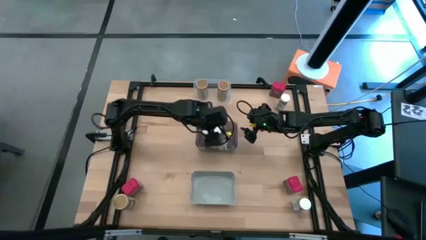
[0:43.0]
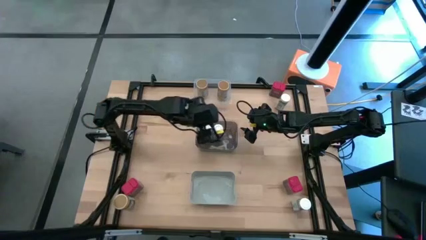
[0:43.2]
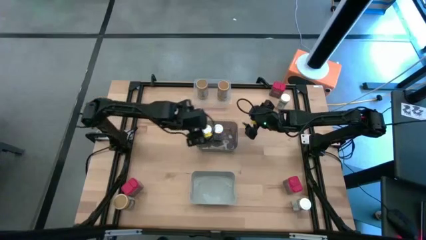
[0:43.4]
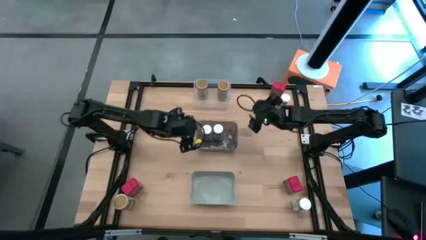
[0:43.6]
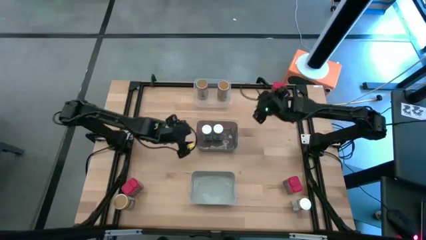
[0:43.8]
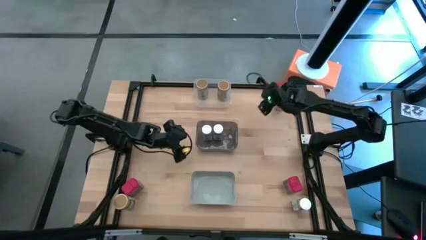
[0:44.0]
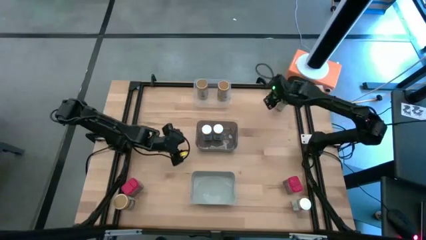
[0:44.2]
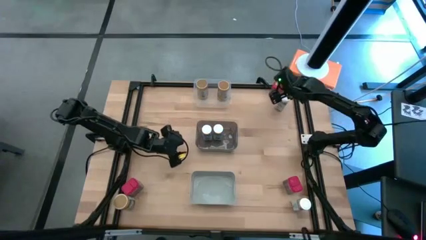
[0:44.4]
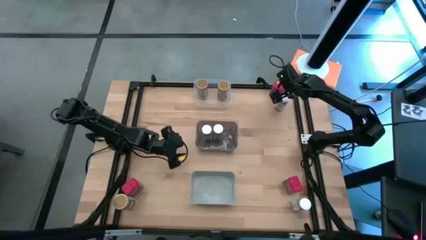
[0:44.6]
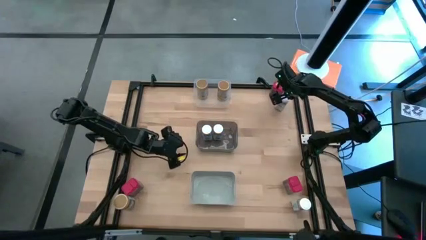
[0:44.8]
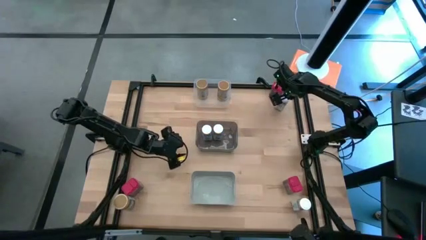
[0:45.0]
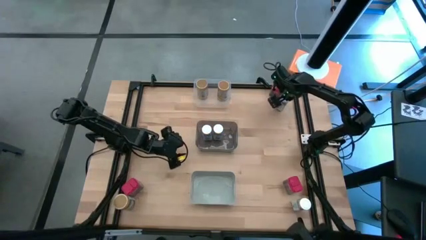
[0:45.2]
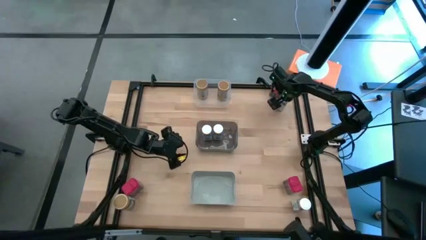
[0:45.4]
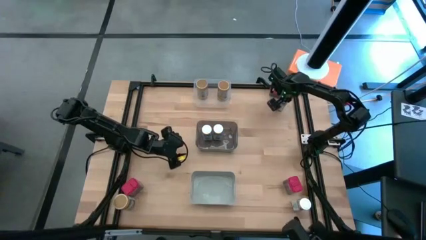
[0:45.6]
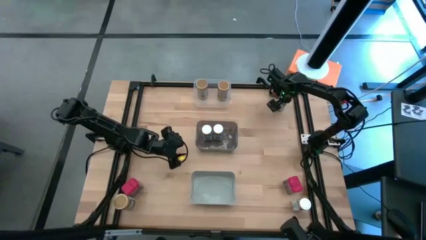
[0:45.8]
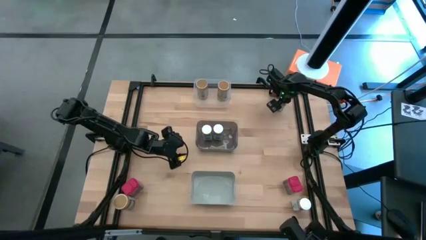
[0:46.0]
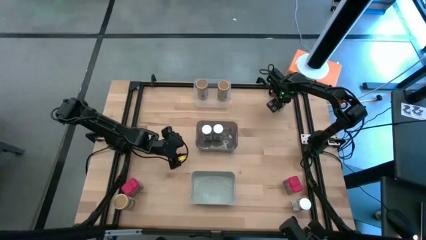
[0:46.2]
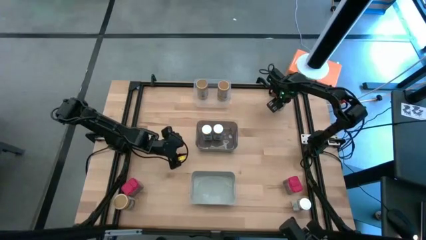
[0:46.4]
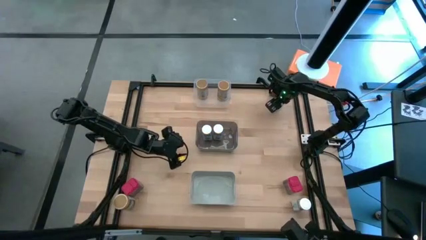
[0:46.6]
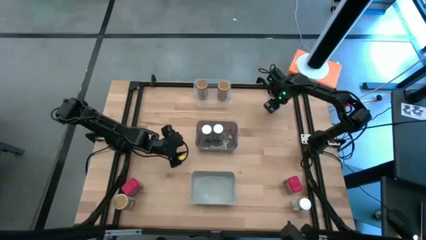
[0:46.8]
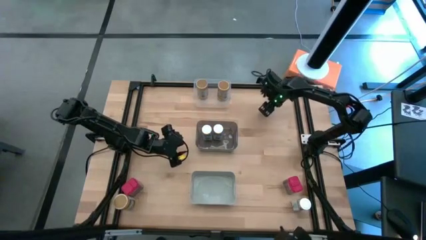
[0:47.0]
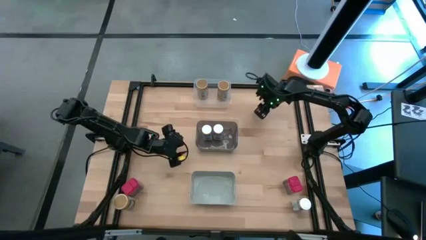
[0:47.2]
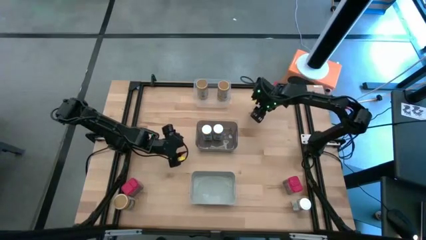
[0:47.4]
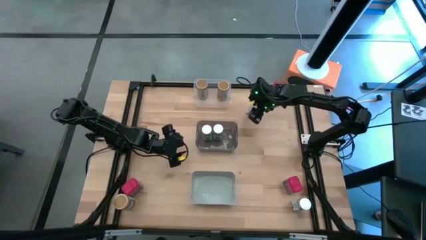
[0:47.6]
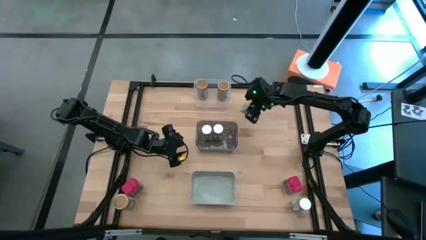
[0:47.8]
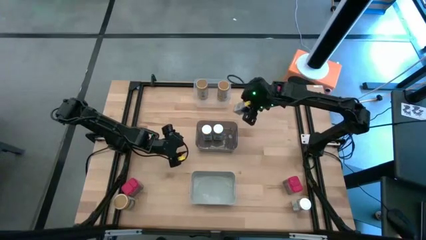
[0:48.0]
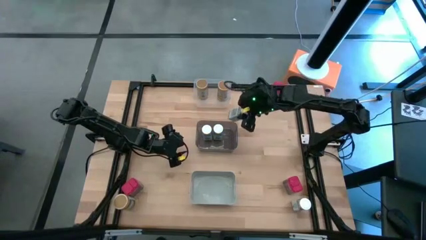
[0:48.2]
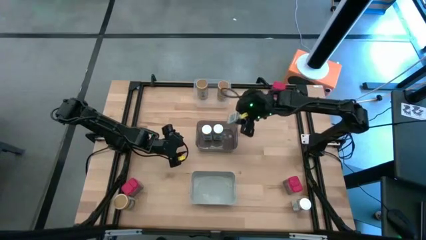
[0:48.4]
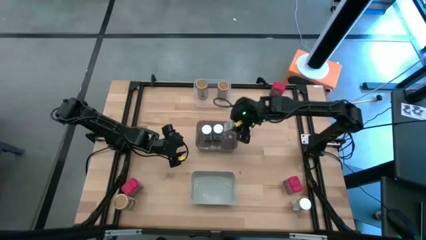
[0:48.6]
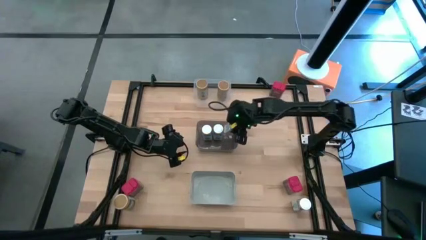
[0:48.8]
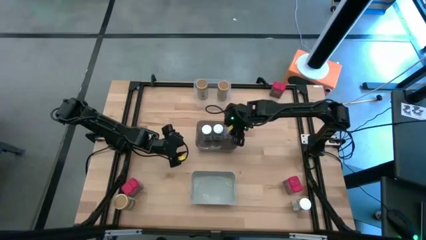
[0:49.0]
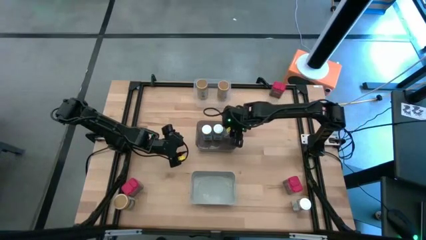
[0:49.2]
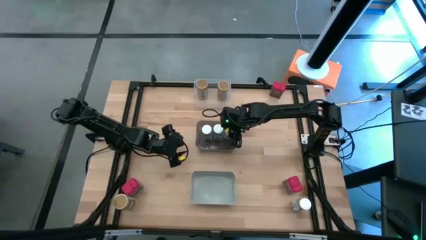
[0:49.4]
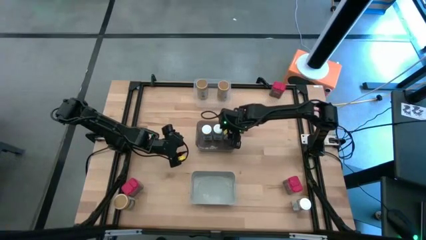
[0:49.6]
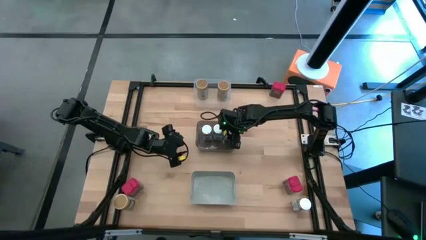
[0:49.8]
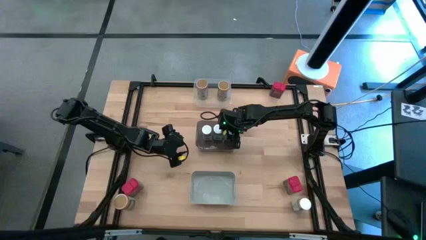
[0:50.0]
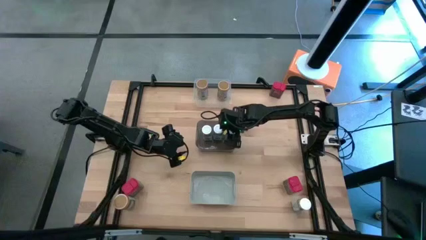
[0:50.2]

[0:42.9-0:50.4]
Task: Sort spices by type
Put the top white seasoning bottle into the black bin

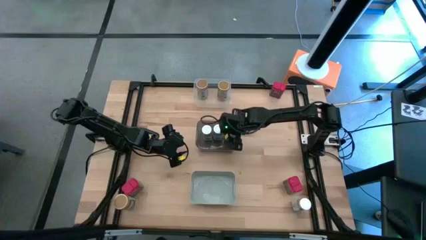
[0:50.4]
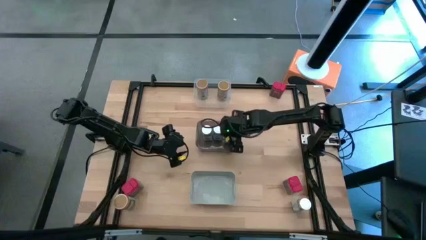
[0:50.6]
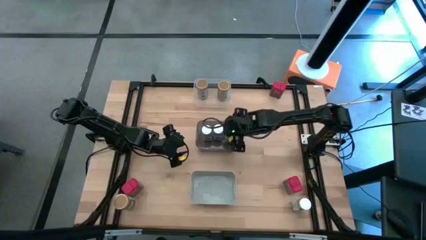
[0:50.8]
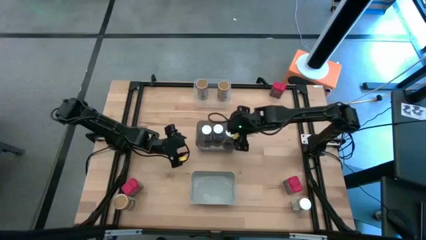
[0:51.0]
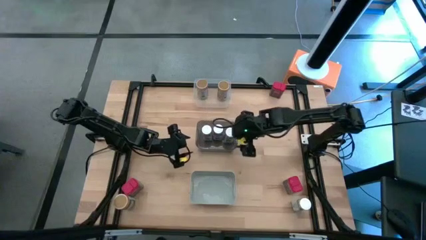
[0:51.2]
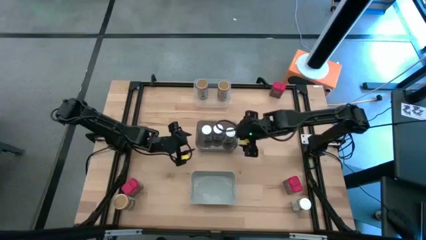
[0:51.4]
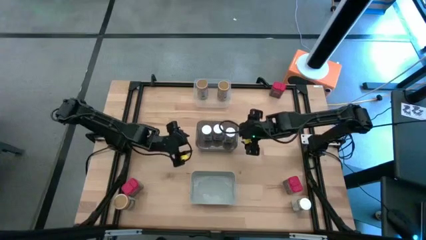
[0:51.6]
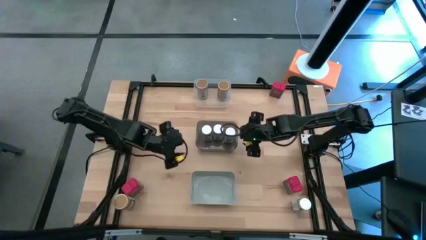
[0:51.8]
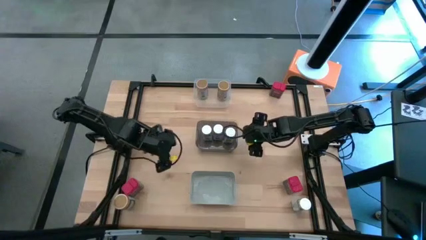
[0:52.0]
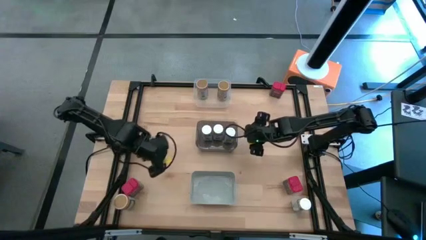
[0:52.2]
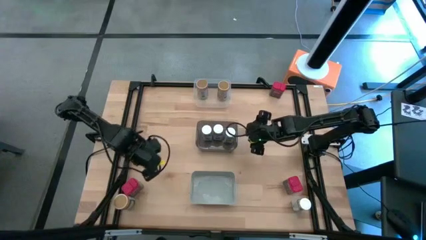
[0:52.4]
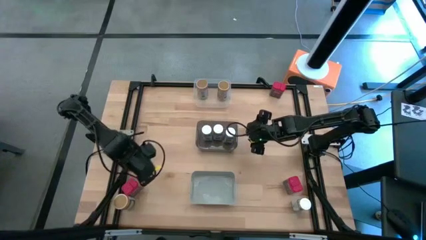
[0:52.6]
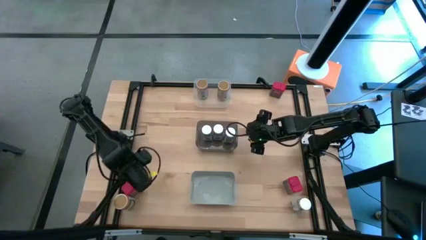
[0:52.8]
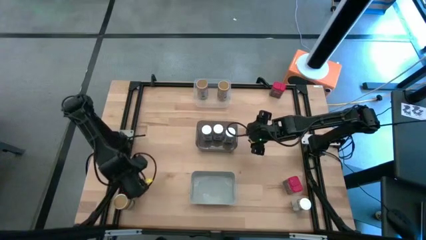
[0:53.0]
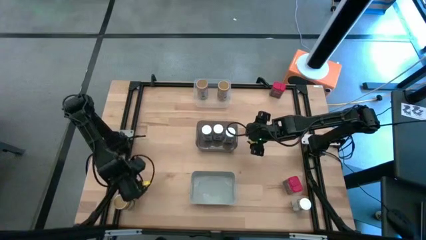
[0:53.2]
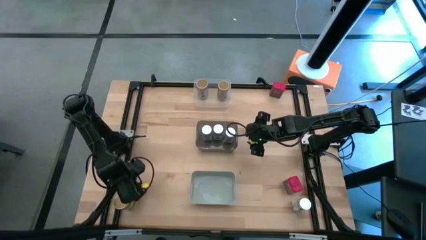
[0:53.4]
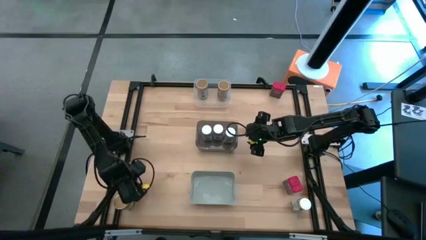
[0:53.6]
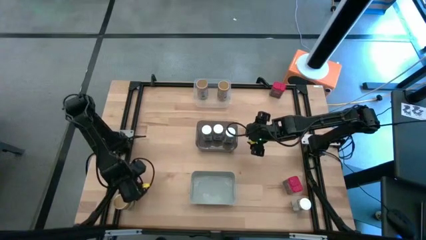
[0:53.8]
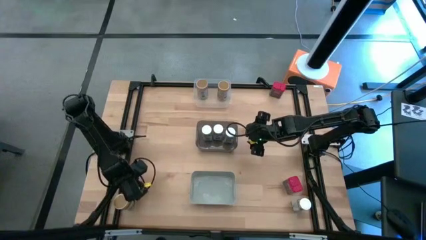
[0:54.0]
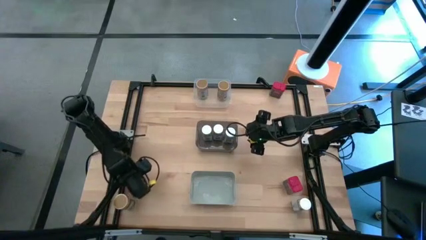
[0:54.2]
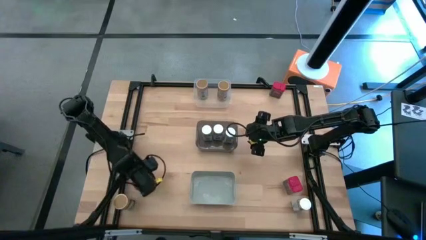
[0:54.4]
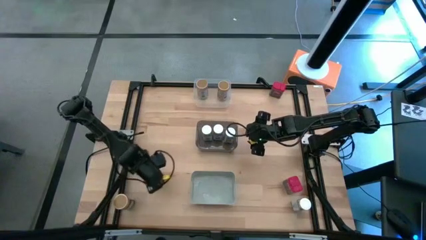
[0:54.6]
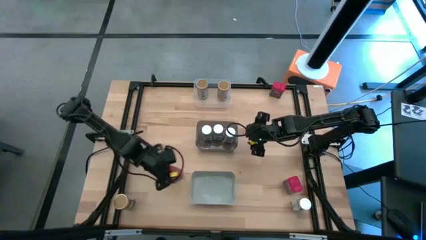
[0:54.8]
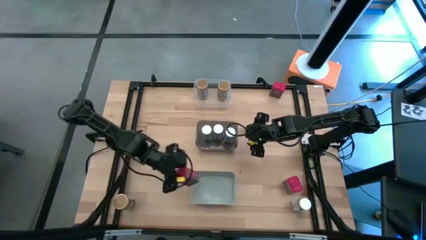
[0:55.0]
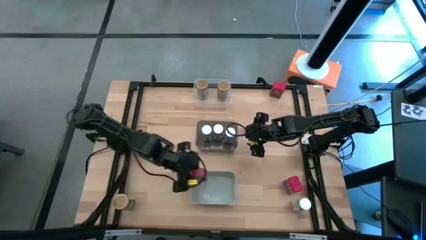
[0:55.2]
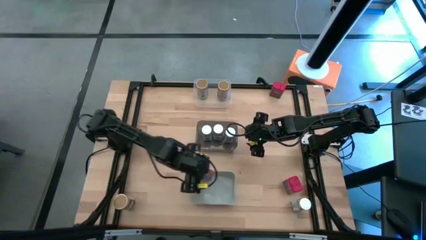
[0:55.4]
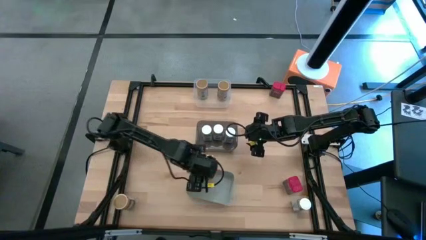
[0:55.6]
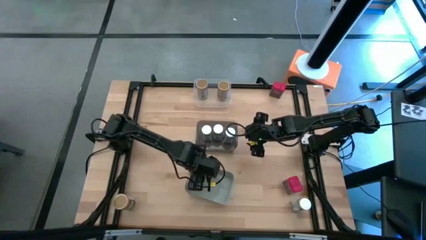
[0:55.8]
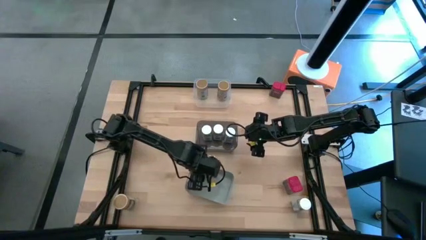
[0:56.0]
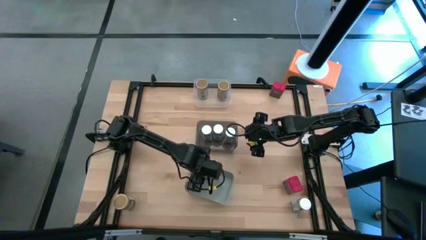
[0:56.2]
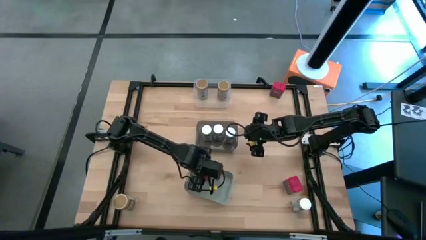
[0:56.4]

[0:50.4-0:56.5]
Put the bottom left red seasoning can into the gray bin

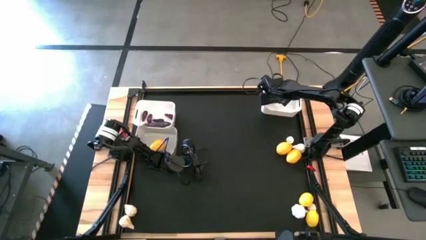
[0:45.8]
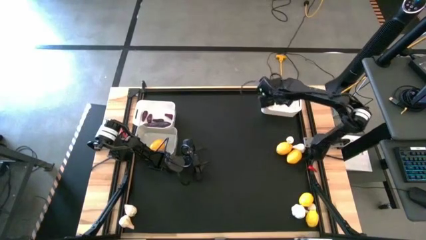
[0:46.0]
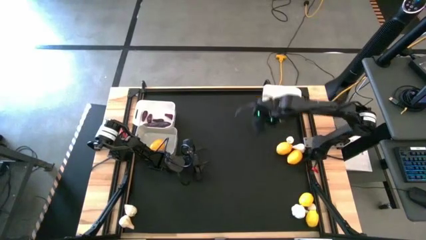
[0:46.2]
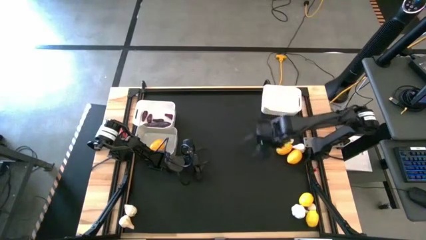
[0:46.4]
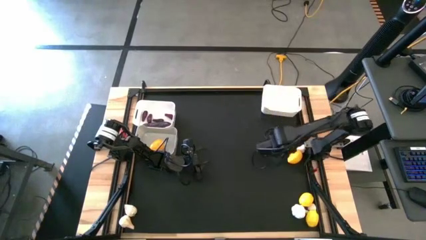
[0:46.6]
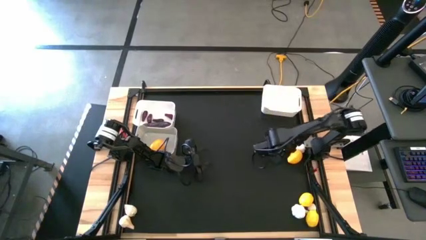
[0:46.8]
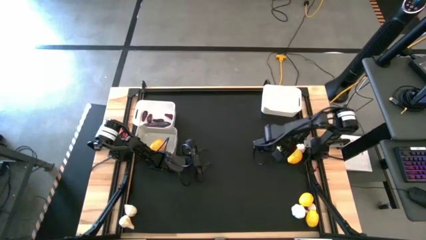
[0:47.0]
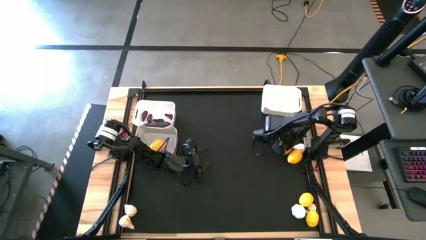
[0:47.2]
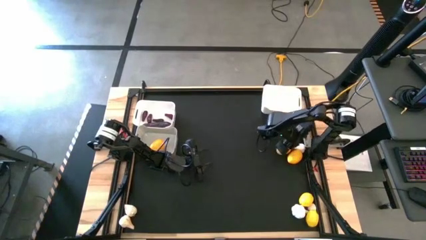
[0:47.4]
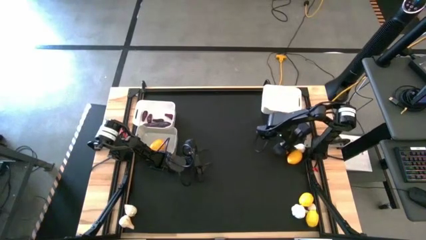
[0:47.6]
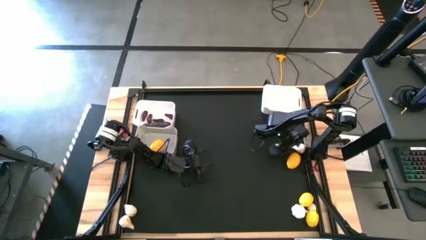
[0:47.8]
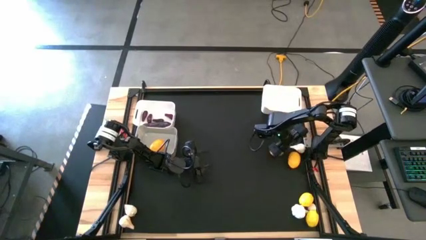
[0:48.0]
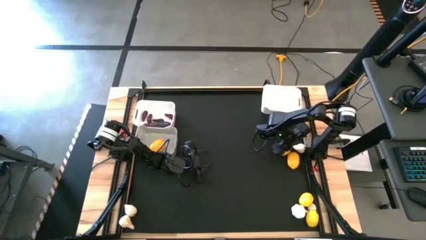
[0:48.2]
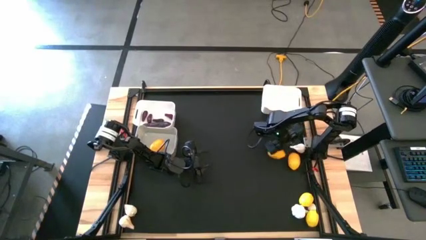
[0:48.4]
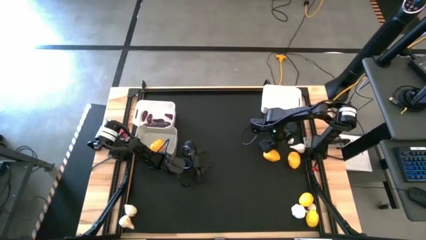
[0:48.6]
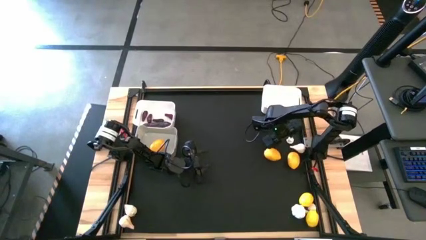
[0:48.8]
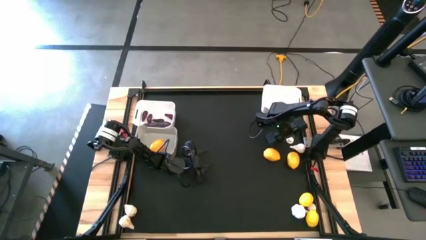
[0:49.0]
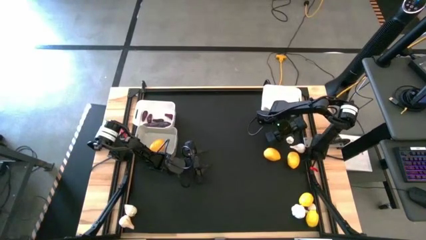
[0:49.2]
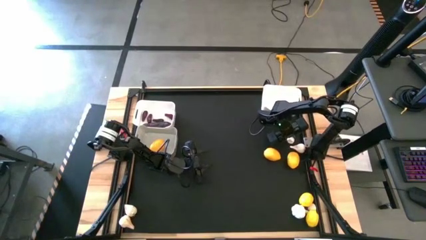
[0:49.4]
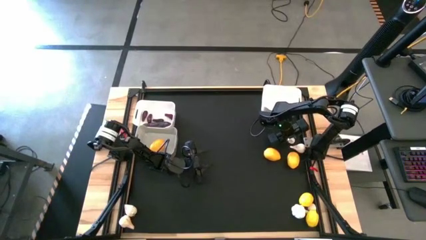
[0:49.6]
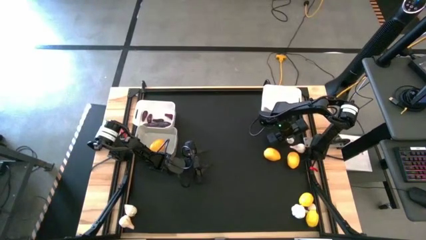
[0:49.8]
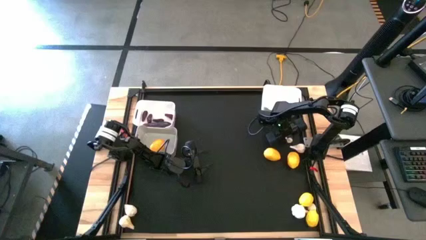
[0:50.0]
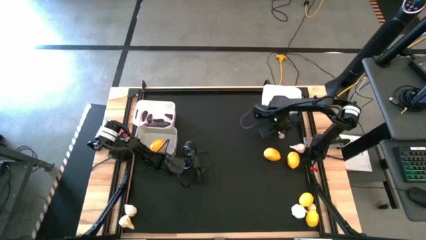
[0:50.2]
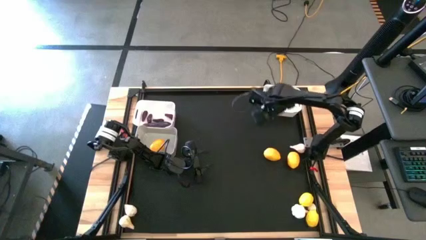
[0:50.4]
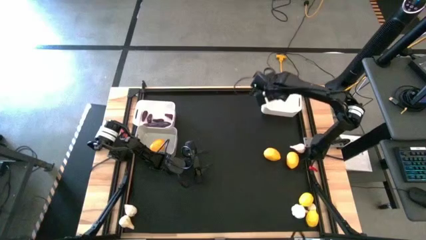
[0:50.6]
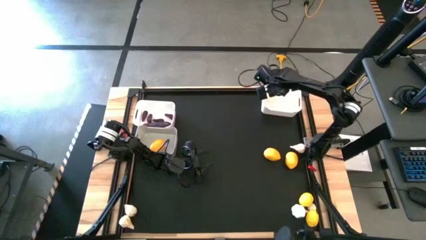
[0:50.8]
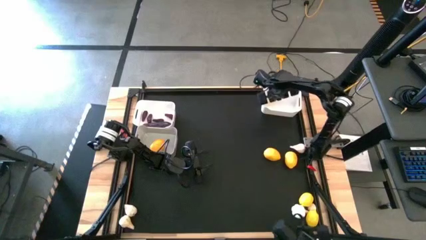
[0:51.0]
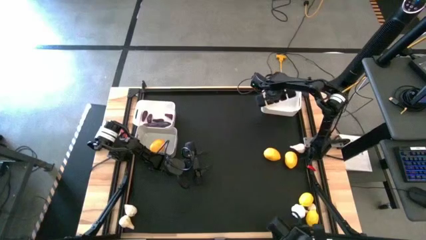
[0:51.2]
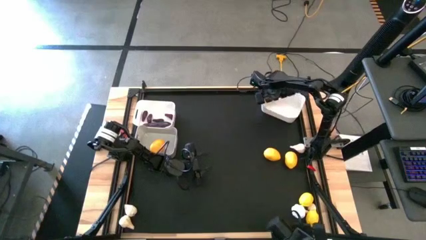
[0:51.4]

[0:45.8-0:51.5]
Task: Sort produce into baskets
Put the garlic into the right white bin
